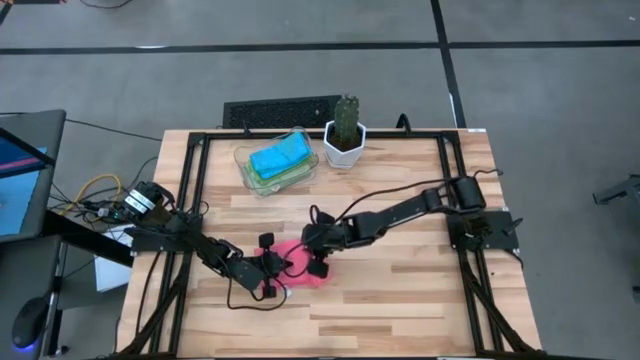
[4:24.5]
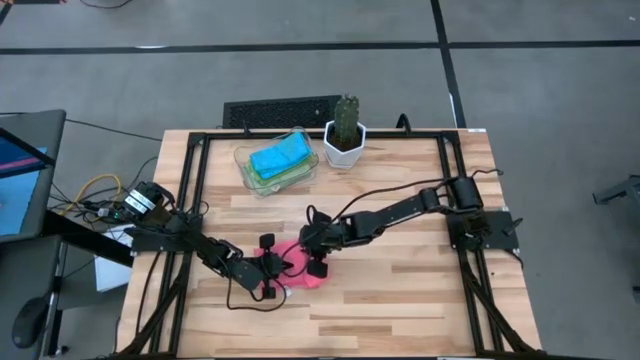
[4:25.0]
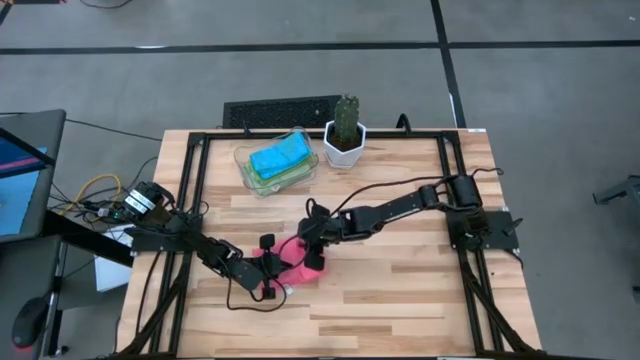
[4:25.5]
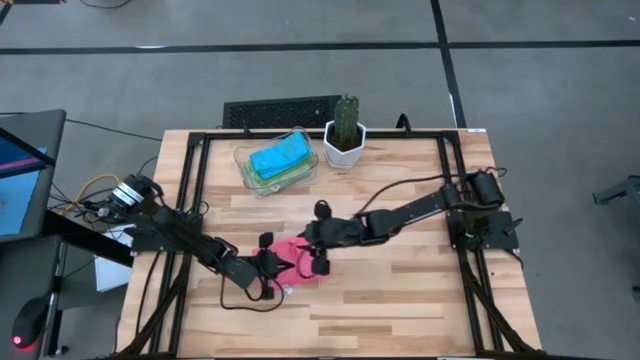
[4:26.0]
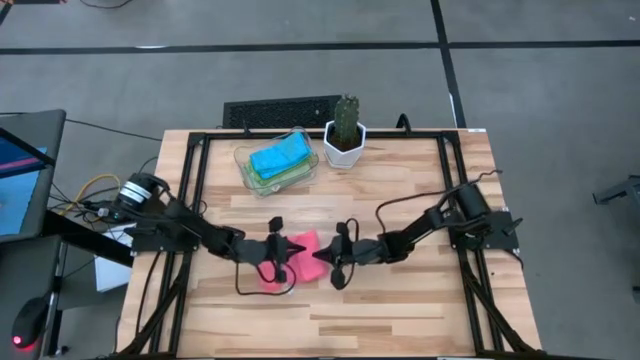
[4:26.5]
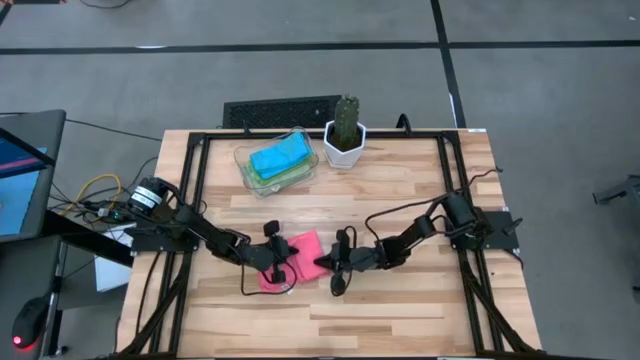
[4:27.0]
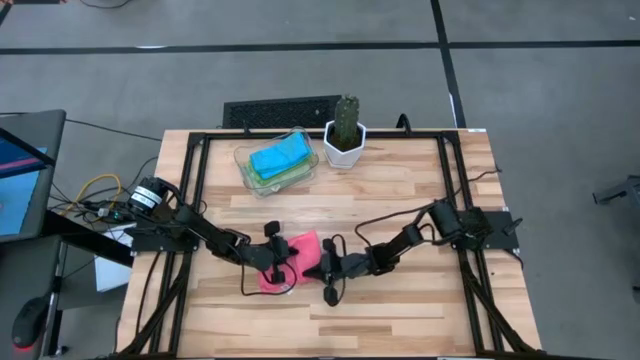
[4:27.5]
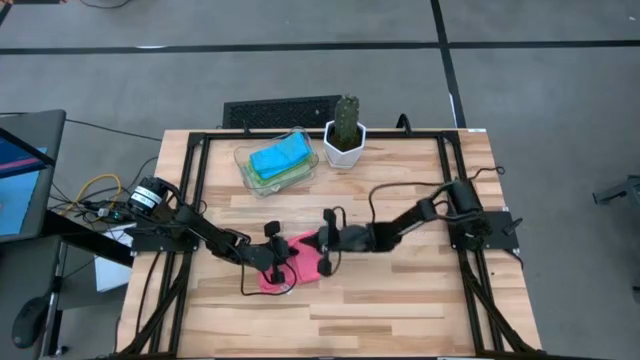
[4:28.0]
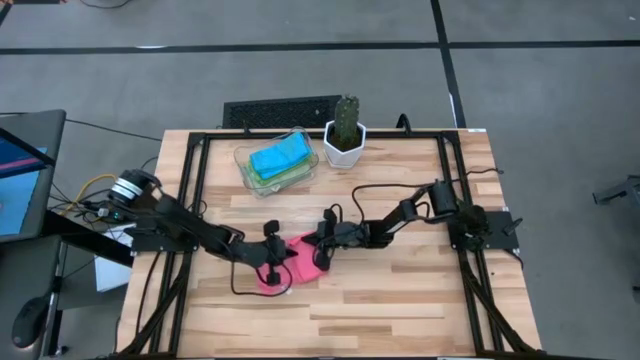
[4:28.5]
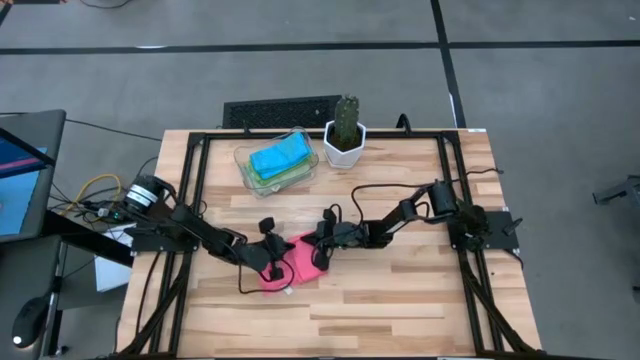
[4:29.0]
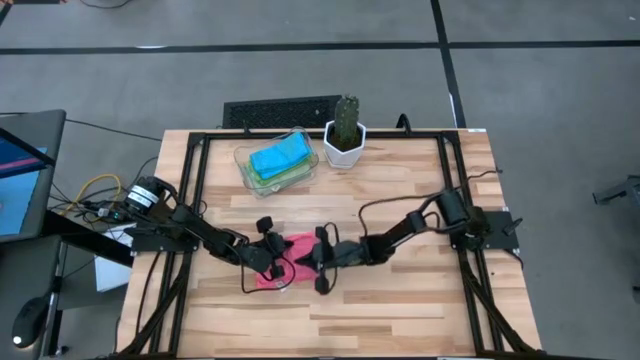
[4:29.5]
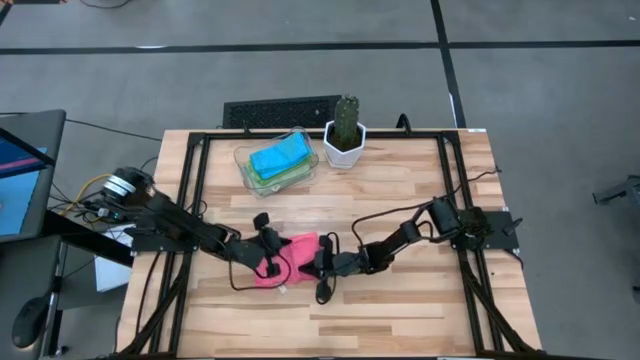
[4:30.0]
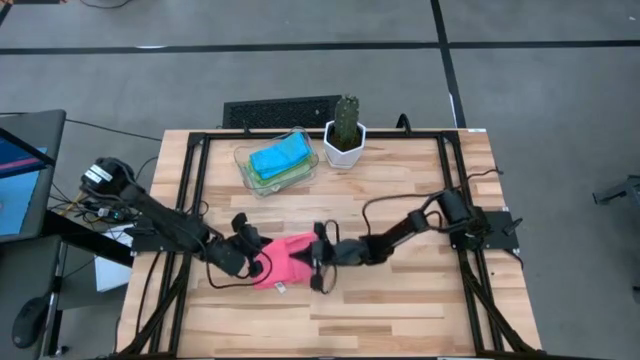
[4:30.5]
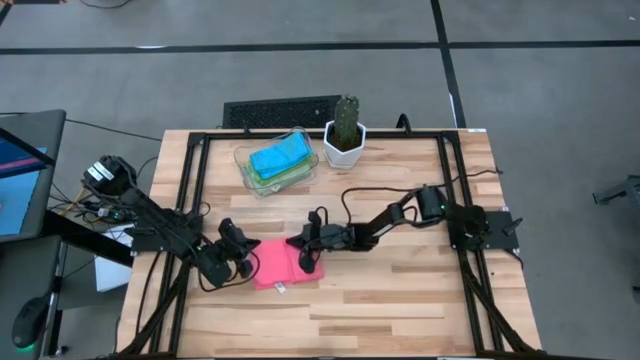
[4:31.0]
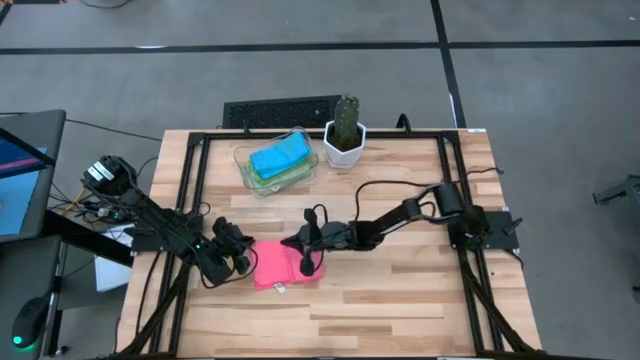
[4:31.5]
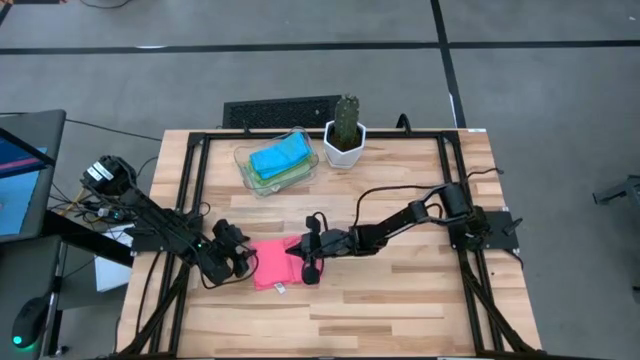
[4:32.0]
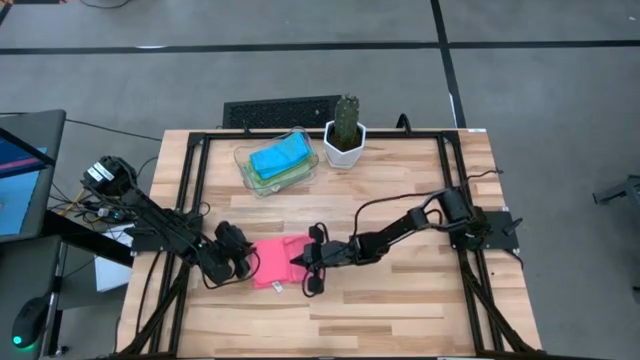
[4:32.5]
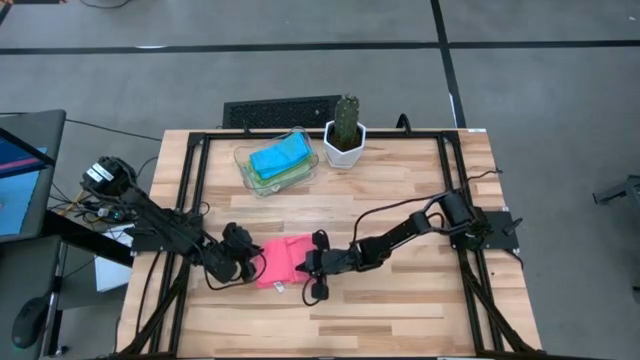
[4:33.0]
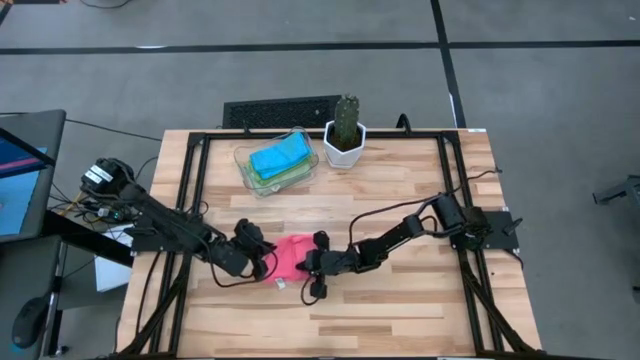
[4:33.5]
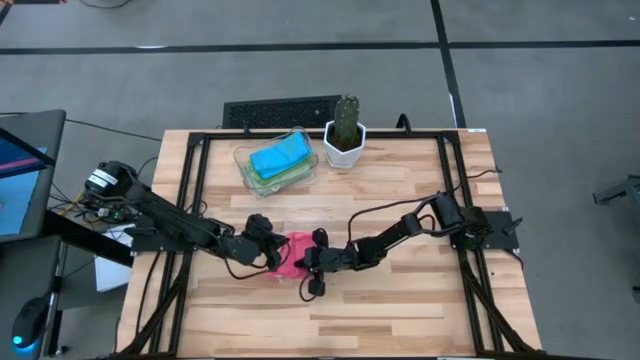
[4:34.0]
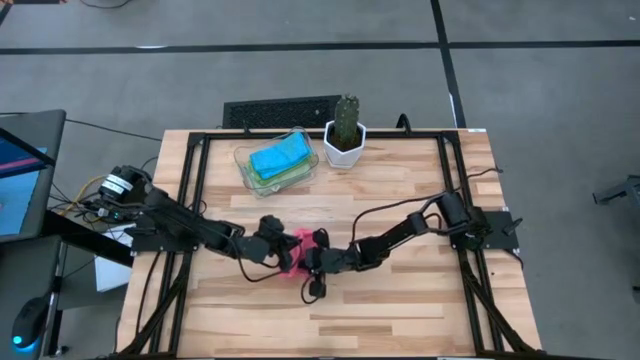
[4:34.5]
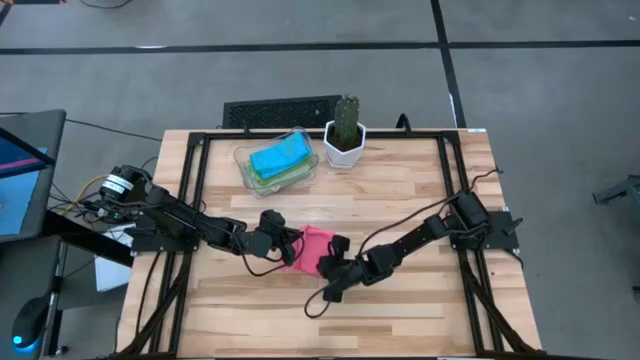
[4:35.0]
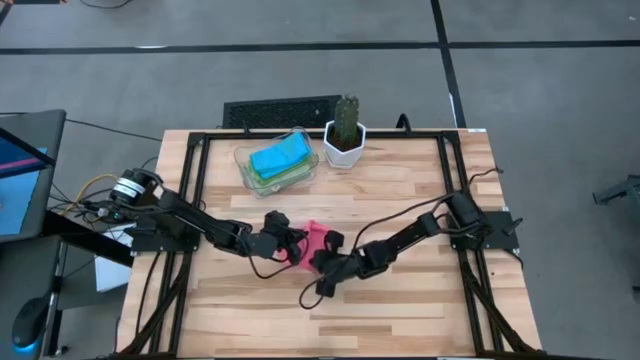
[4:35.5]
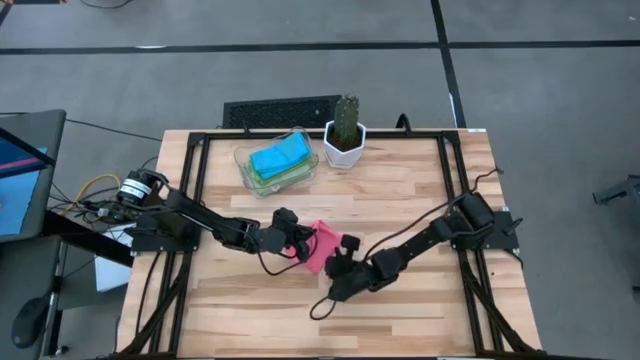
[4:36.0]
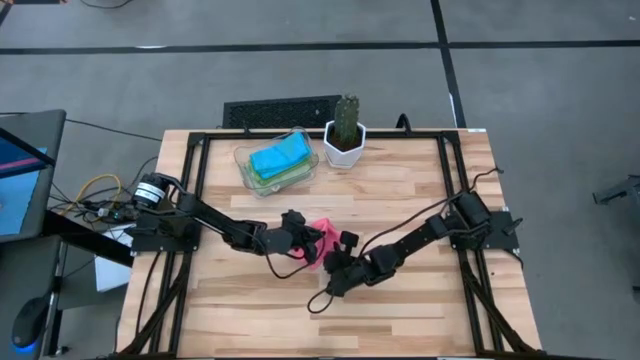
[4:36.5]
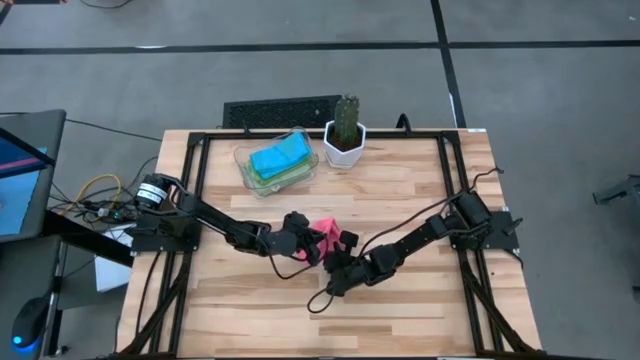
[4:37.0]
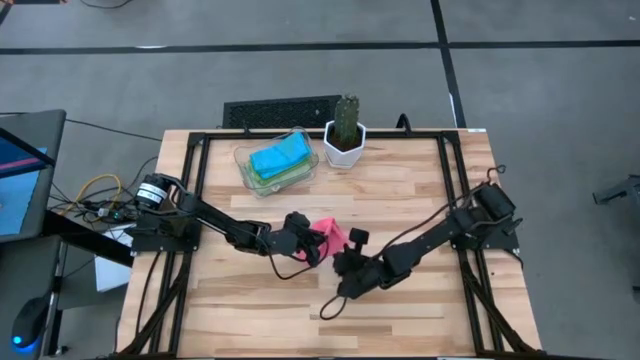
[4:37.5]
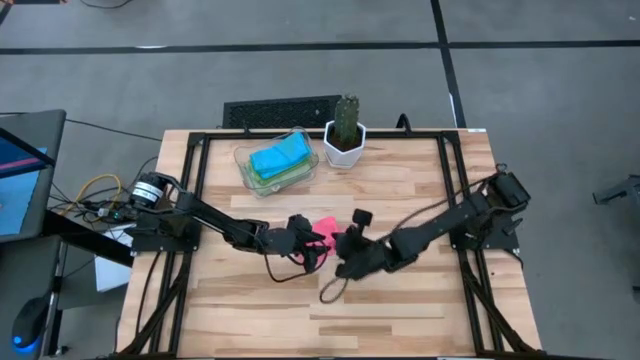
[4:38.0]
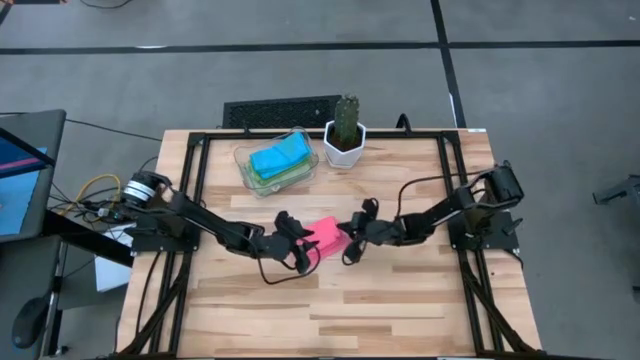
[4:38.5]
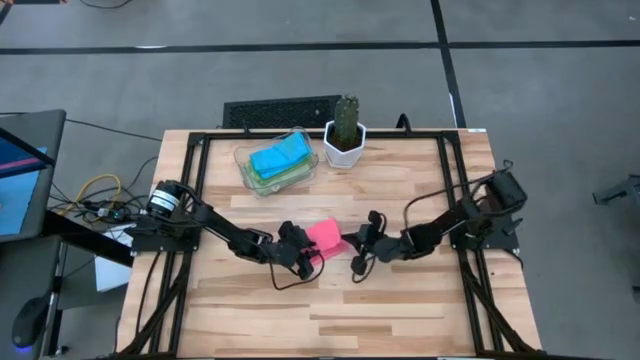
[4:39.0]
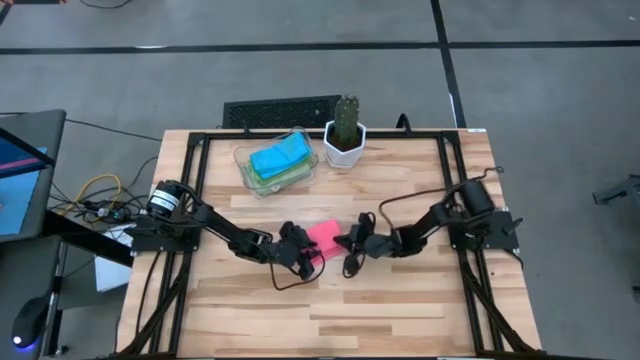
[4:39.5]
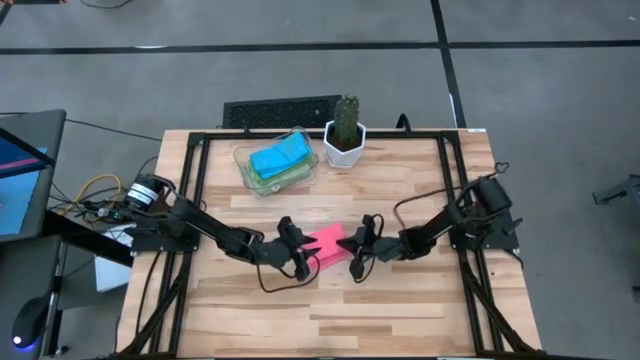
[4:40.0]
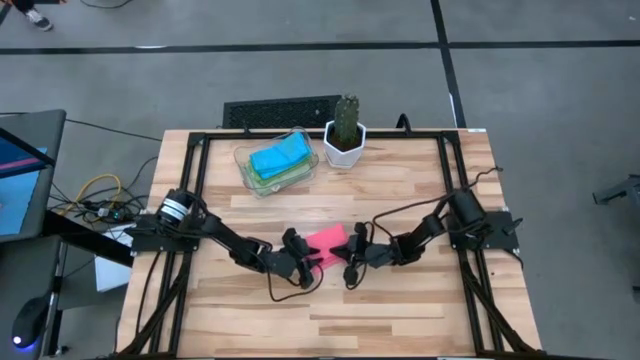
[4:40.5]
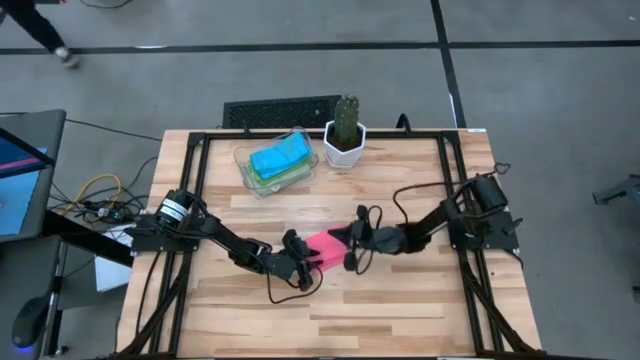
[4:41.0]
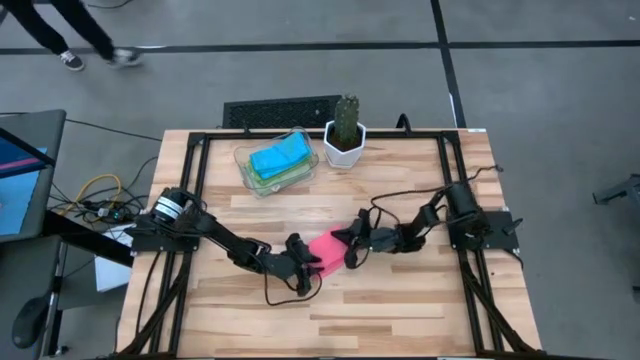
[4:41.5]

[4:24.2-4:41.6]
Task: Fold microfiber towels
Fold the pink microfiber towel

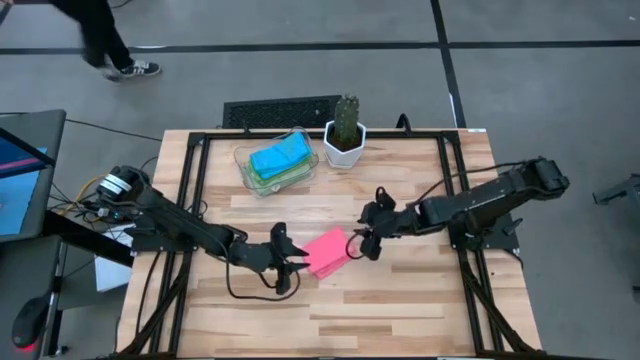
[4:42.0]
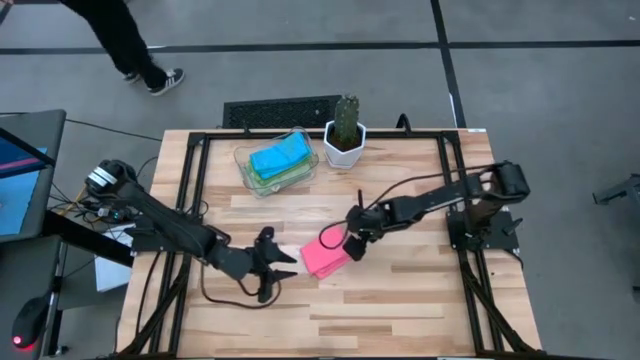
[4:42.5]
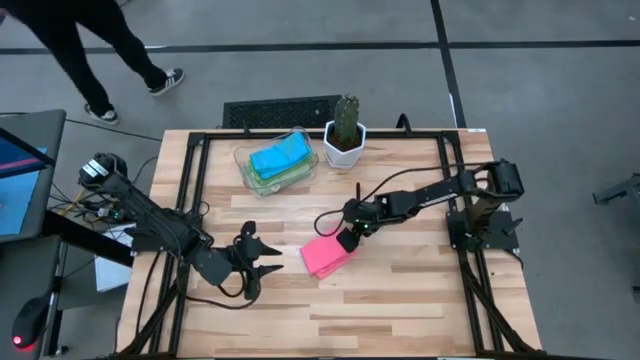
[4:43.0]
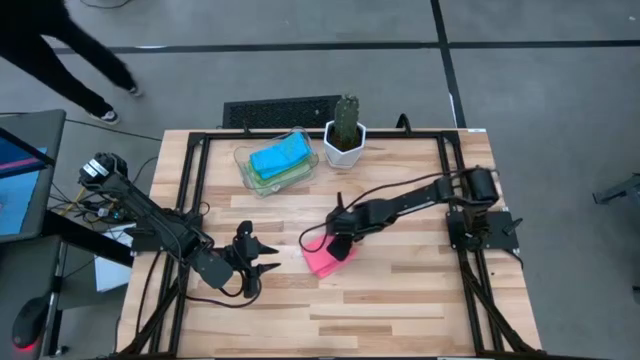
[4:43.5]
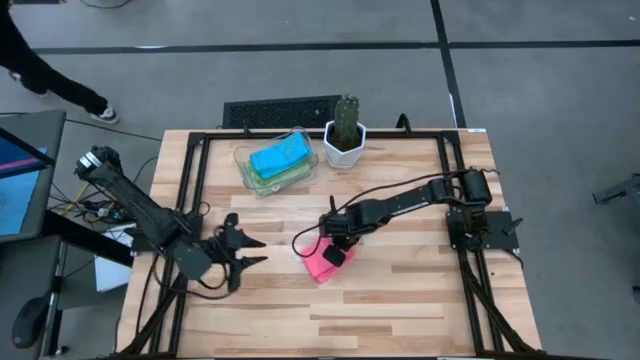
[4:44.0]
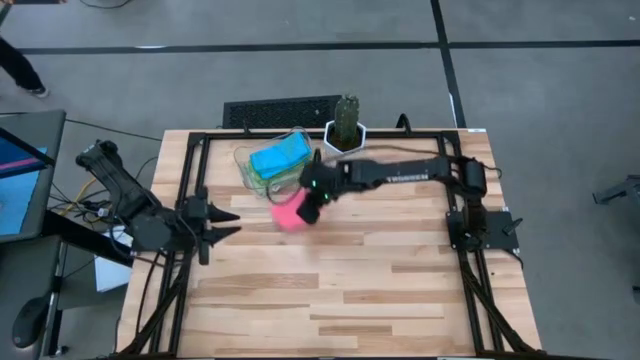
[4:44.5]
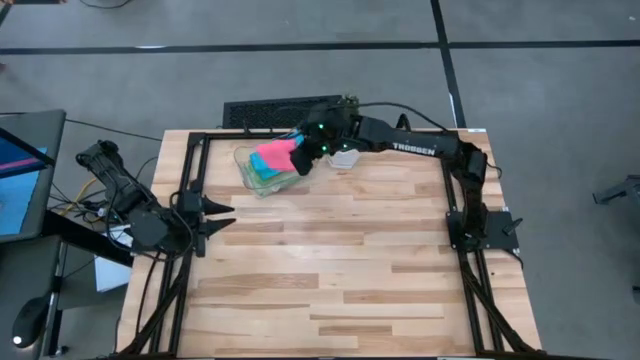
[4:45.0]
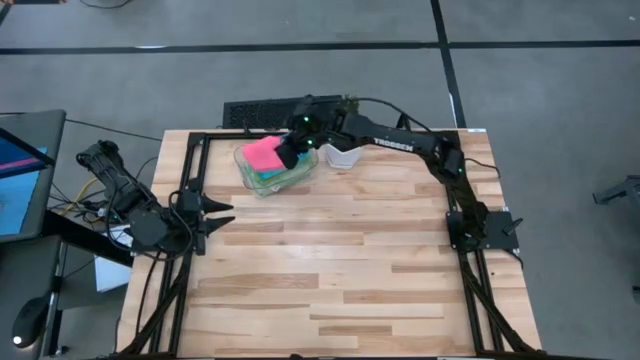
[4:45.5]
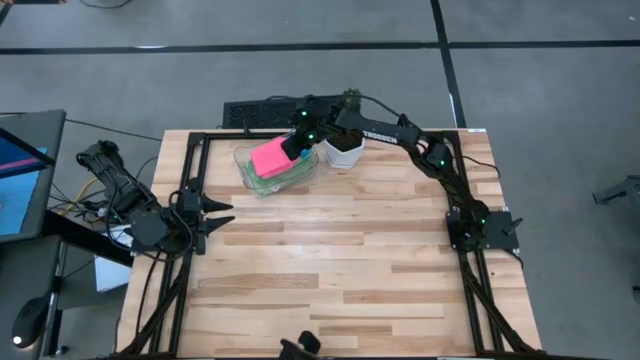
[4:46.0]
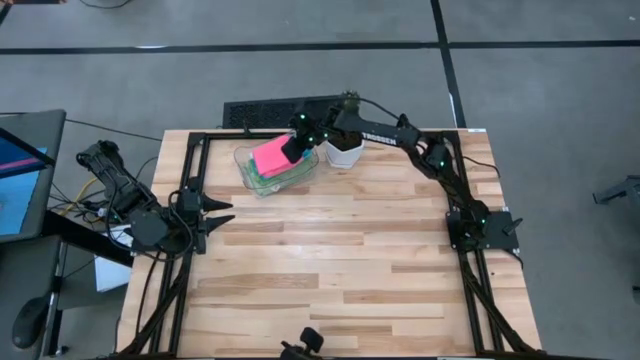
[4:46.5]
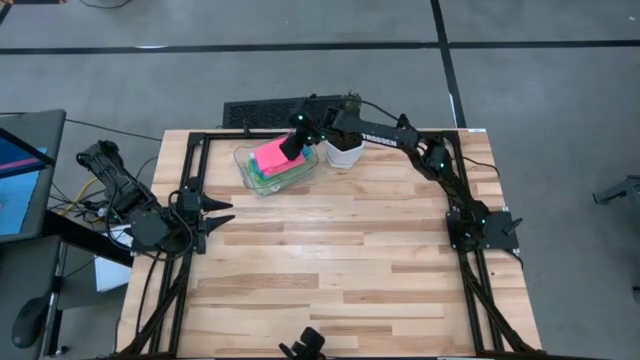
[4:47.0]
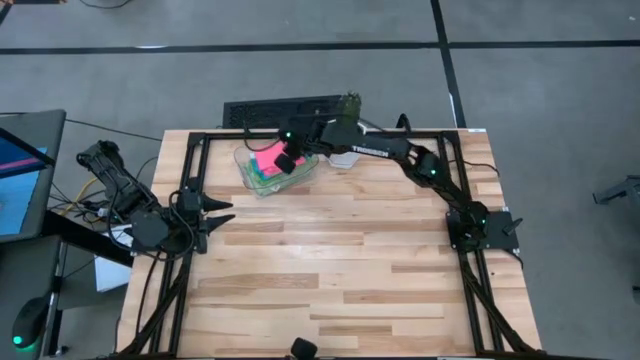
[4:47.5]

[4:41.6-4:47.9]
Put the pink microfiber towel into the transparent bin
